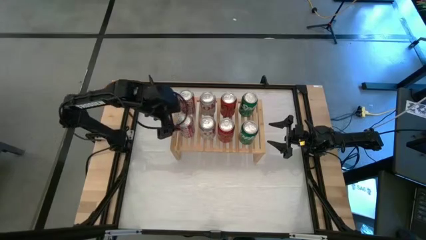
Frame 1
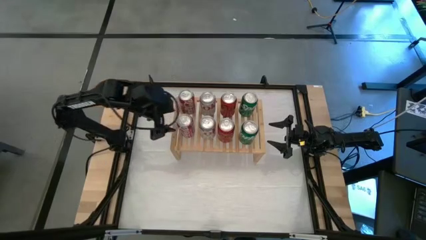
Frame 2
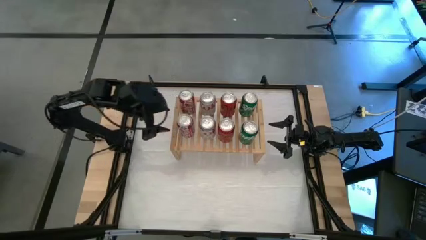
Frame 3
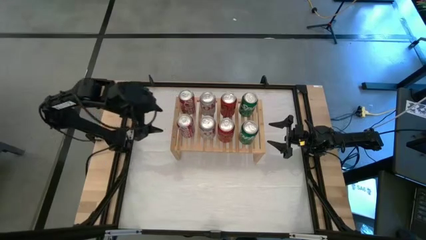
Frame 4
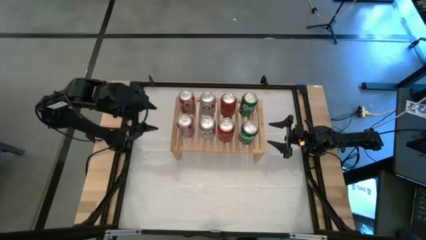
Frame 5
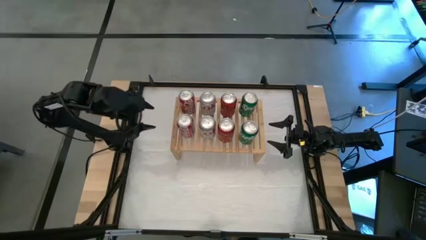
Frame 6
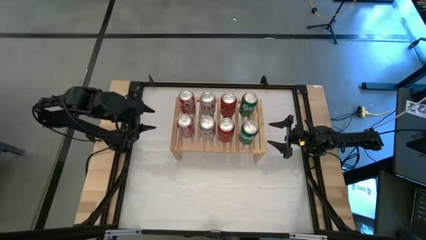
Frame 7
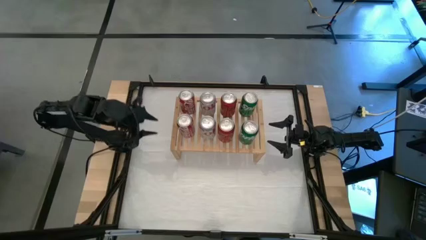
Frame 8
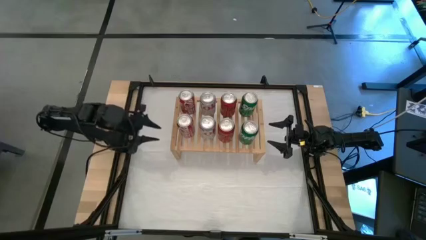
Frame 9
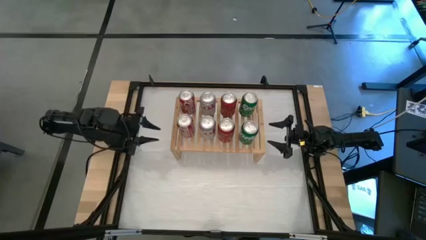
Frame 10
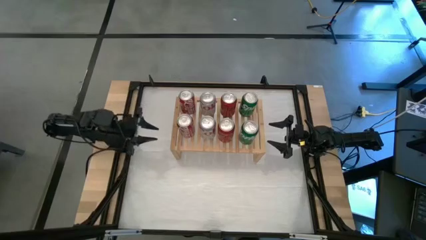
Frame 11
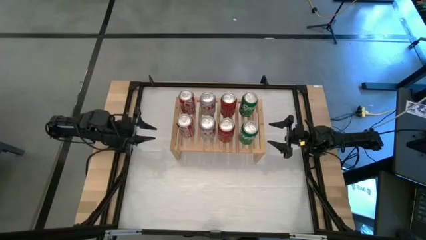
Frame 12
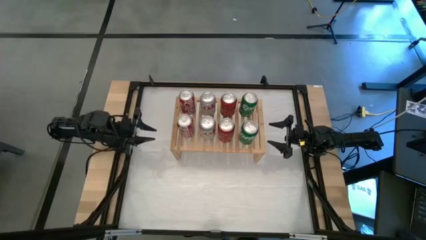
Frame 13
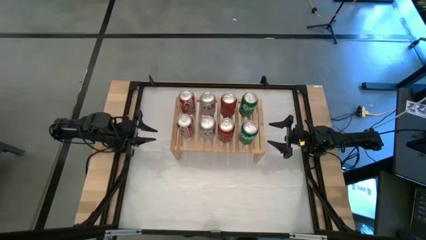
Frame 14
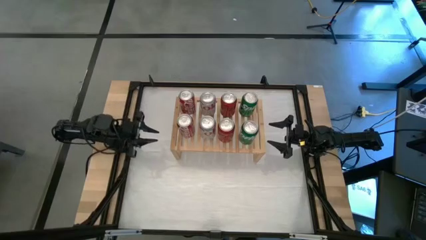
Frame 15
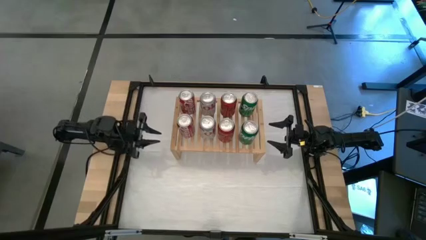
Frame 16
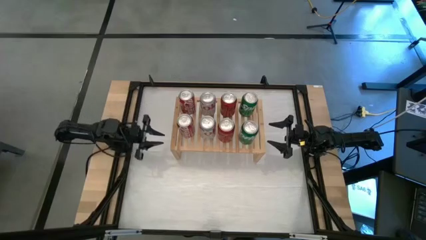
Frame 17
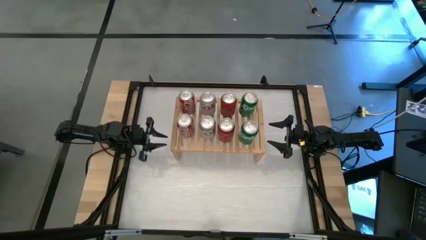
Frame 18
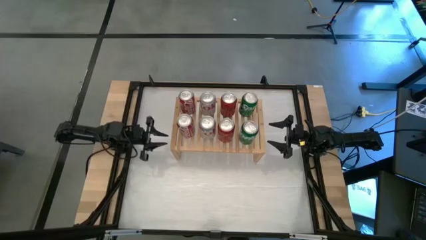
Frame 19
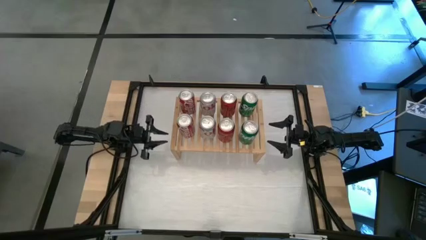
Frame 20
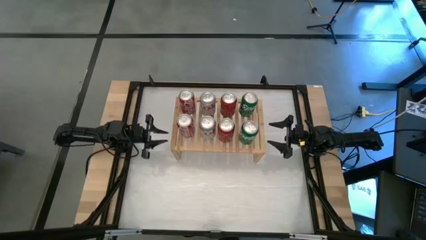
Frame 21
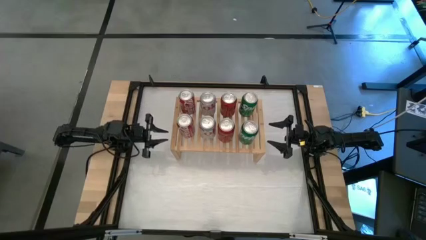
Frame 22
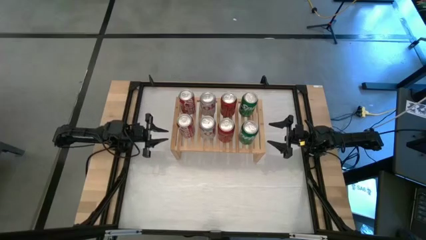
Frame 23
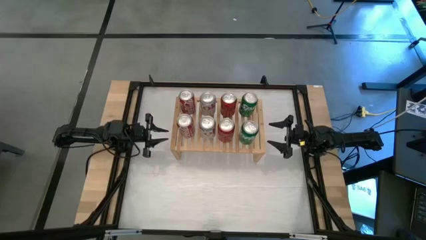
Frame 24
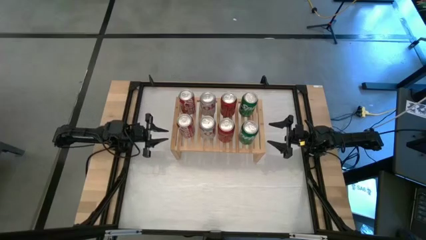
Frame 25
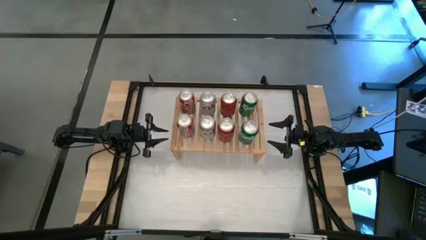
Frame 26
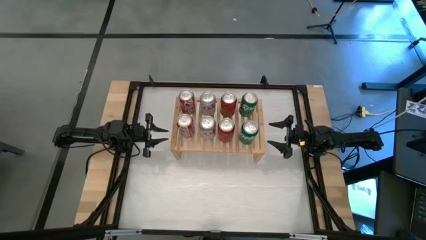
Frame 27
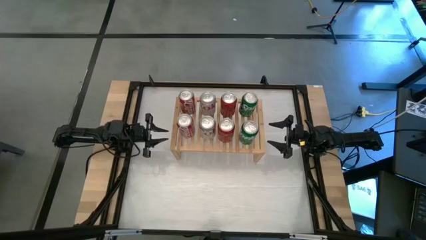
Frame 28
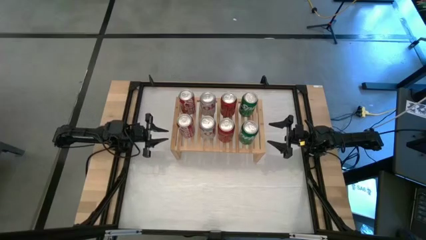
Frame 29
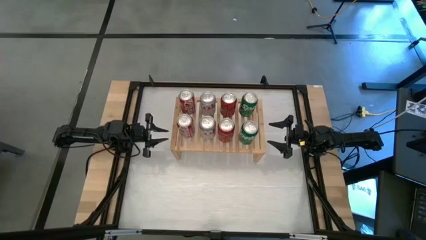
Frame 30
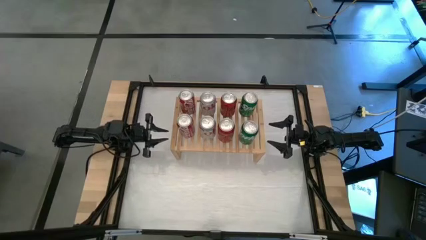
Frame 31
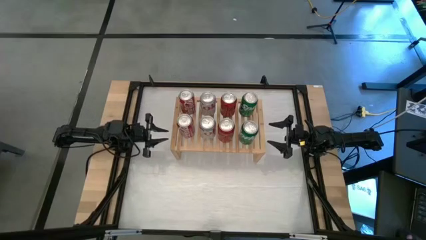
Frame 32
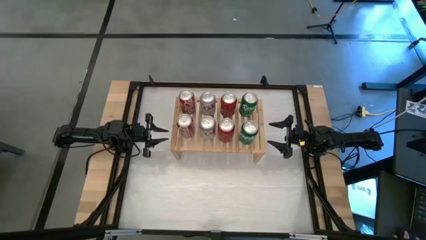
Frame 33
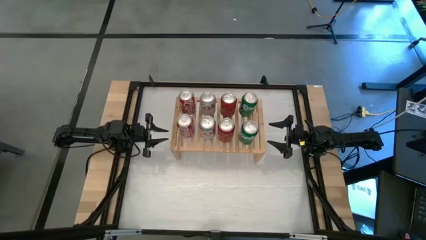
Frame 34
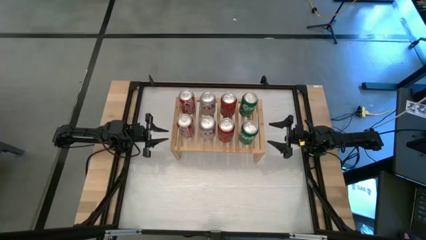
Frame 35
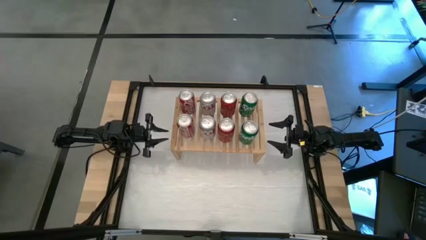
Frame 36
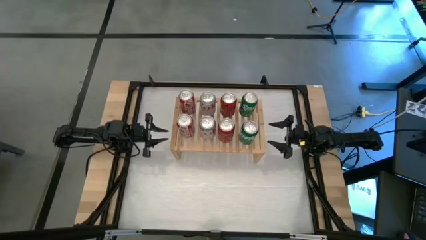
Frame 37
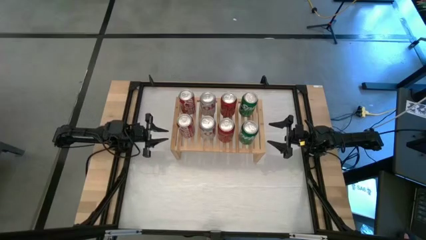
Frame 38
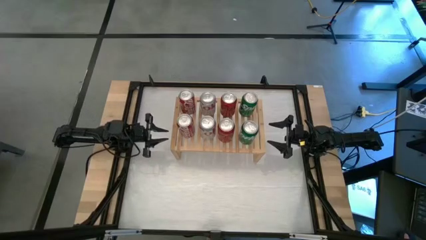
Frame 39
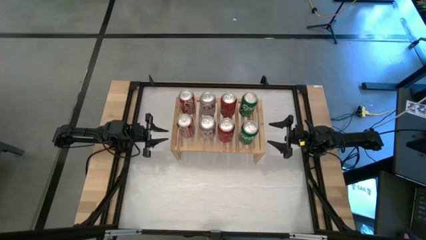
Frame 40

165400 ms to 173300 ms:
Task: Place canned beverage on shelf
Return to Home Position

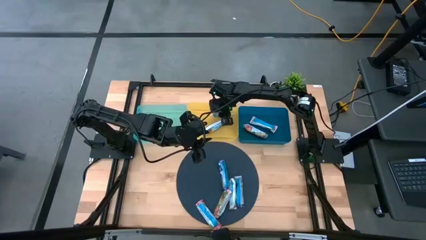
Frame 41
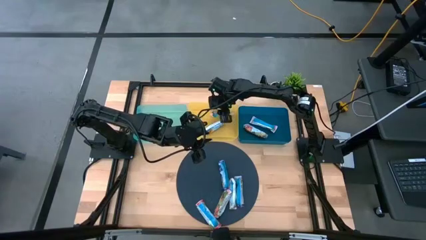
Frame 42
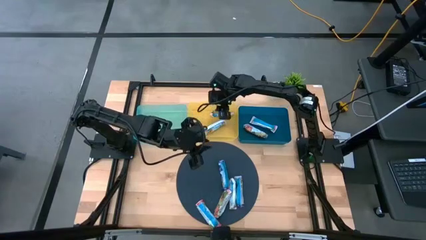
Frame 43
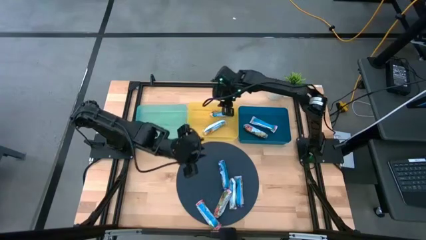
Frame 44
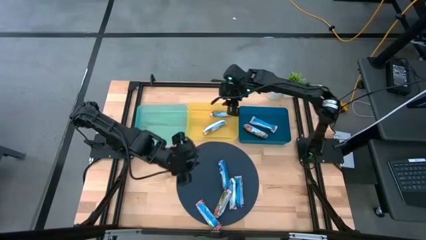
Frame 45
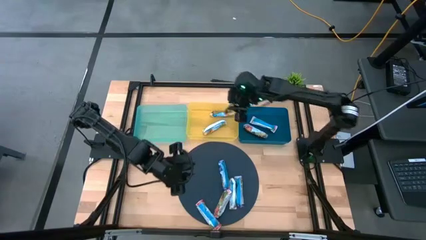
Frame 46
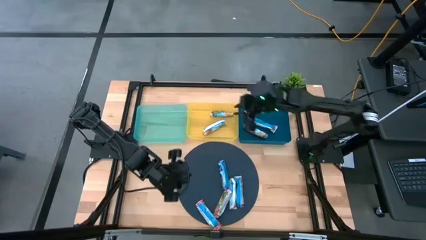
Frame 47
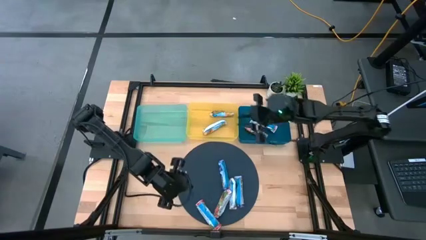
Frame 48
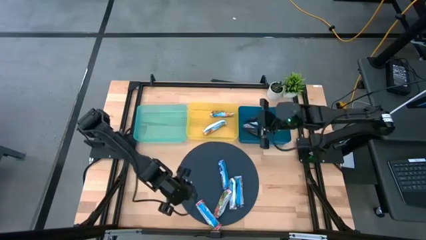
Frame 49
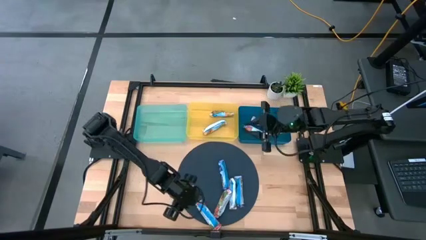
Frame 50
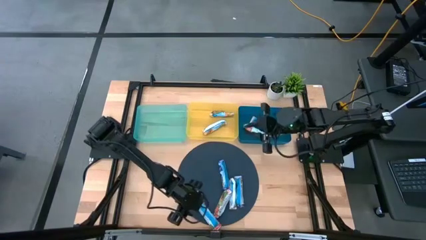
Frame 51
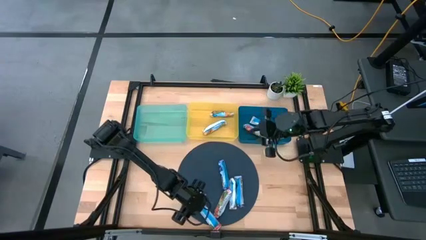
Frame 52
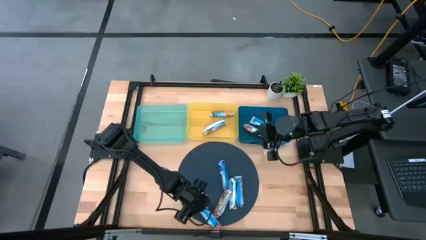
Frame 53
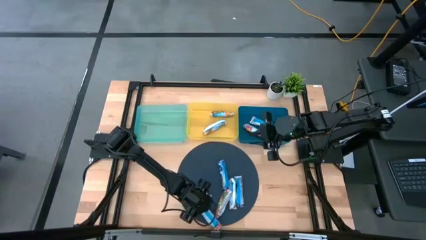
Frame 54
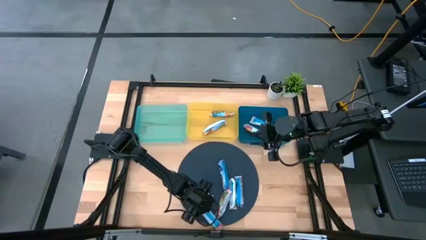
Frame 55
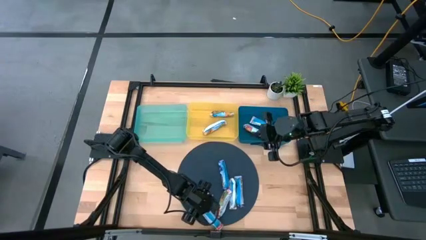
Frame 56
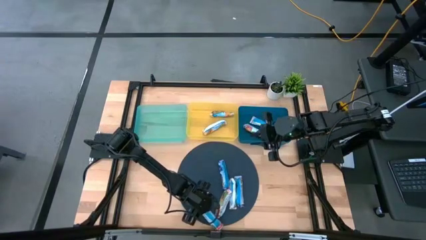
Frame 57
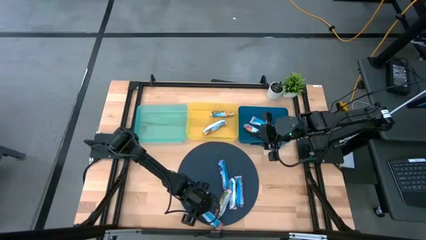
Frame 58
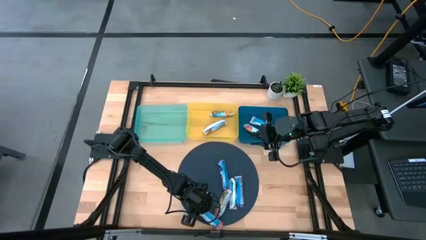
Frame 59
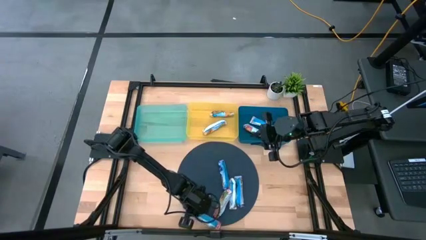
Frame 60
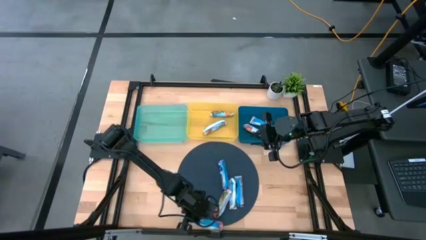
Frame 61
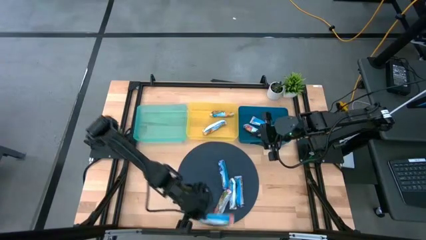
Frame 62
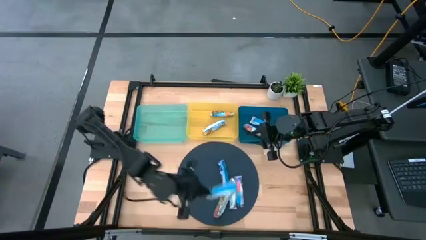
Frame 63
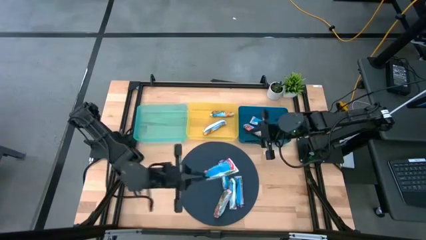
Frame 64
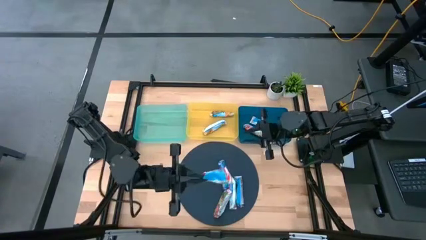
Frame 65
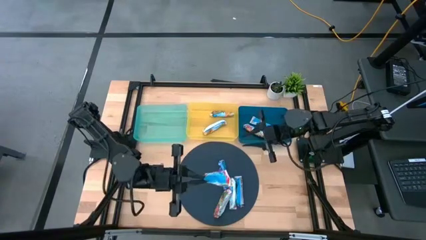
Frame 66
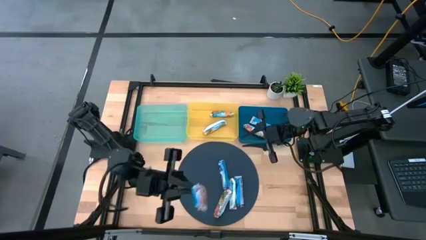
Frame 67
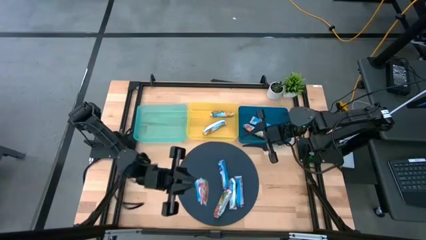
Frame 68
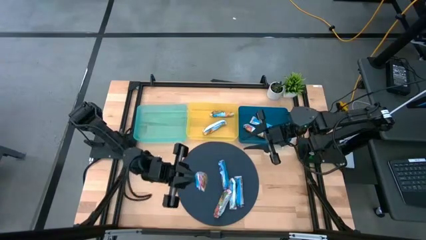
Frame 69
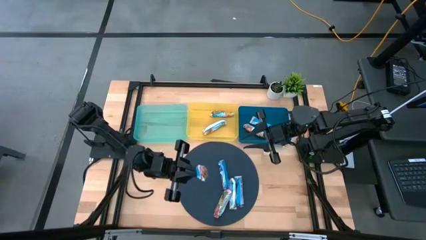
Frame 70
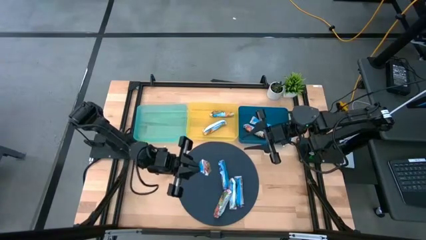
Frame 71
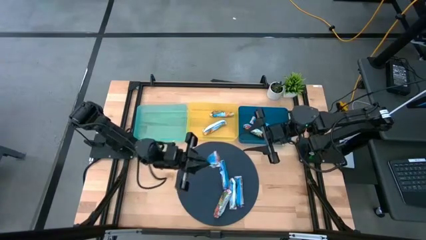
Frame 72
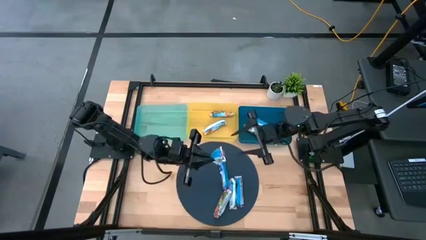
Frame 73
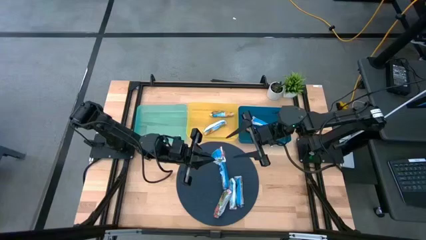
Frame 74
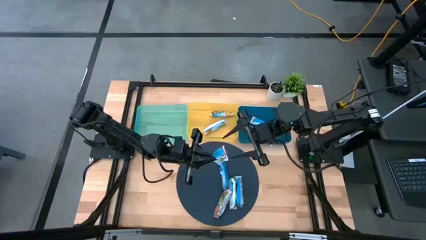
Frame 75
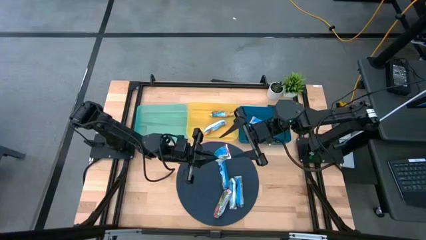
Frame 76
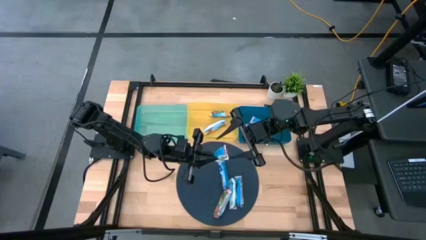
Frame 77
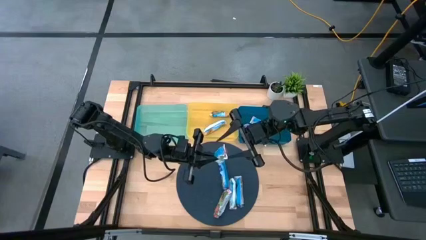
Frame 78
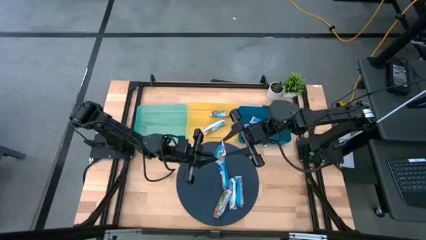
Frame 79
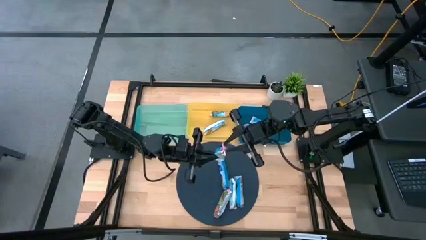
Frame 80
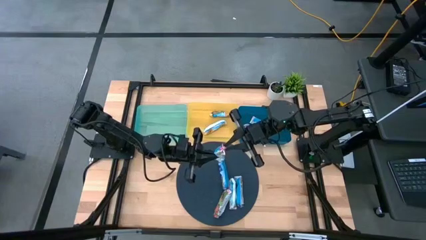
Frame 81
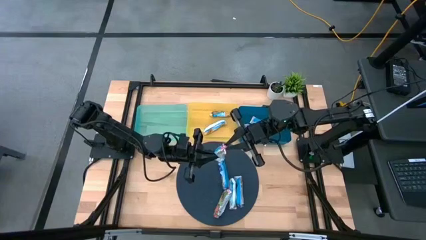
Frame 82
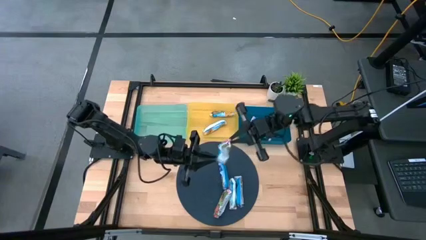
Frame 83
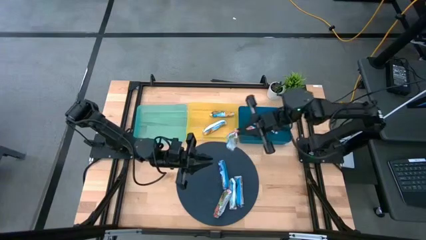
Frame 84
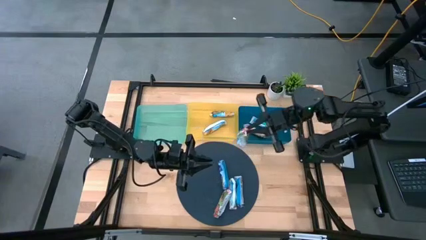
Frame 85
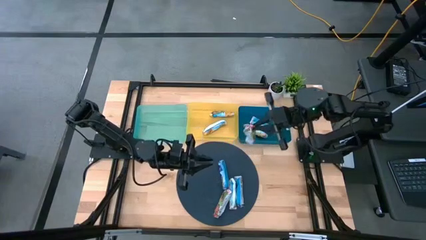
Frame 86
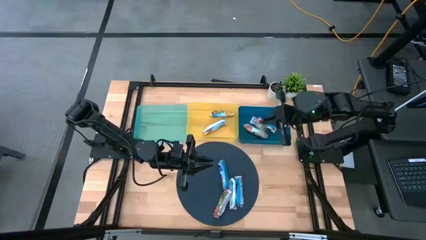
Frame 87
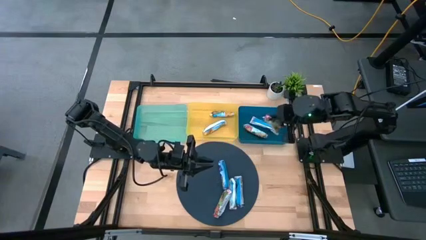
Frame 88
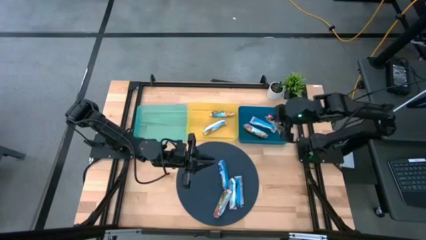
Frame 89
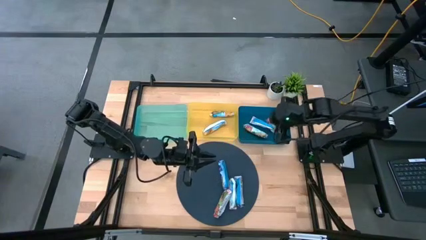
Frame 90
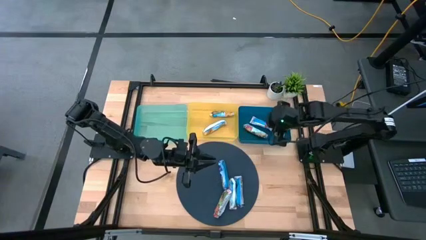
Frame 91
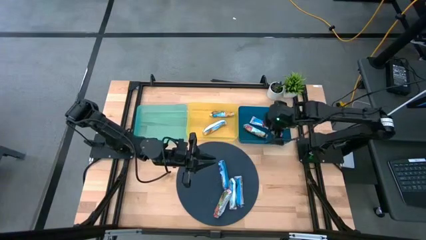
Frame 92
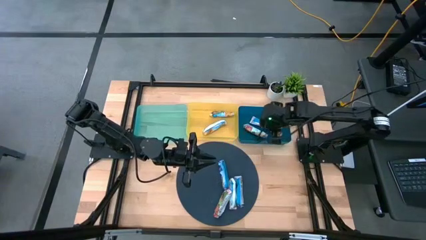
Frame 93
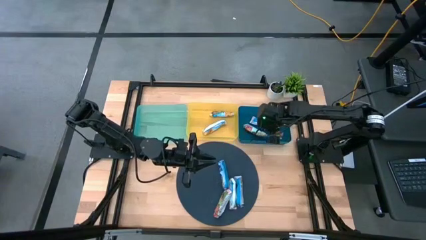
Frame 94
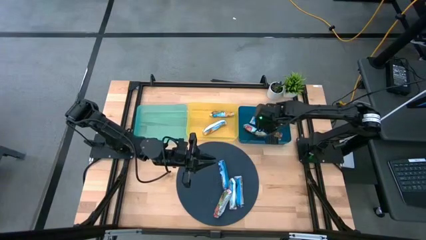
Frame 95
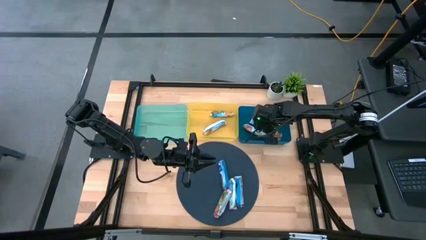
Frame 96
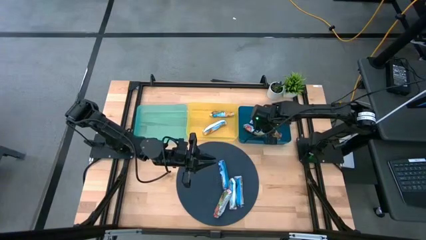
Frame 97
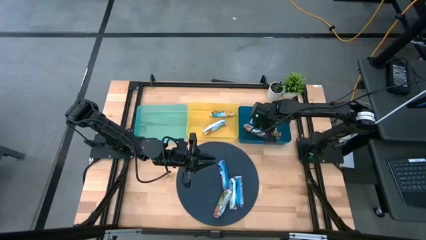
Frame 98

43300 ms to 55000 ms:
Task: Pick and place Granola Bars by type
Put the red granola bar into the blue bin
